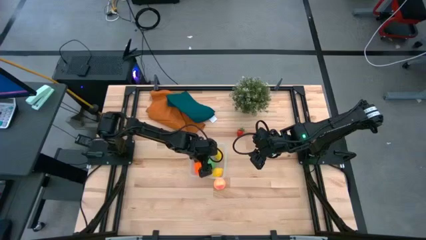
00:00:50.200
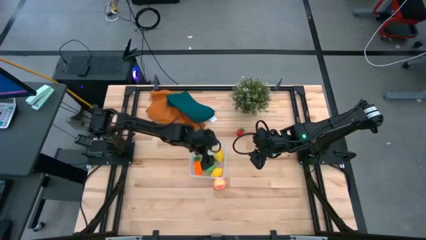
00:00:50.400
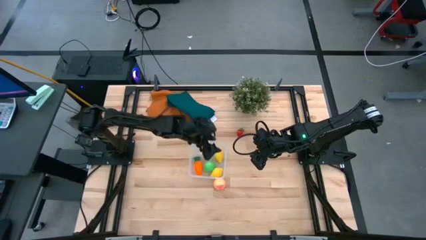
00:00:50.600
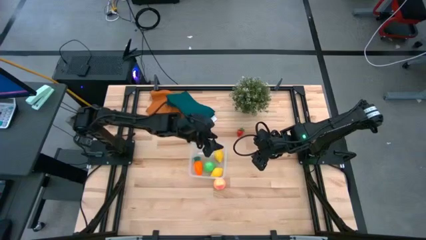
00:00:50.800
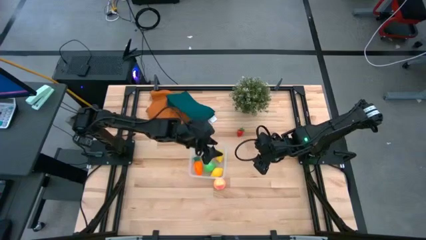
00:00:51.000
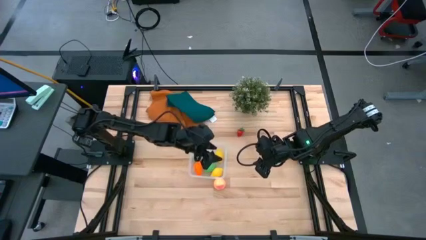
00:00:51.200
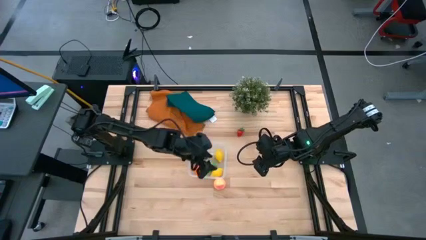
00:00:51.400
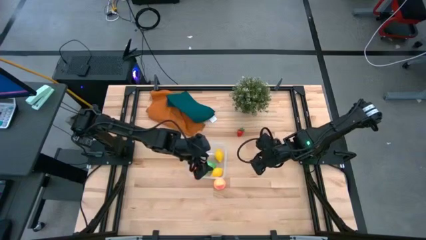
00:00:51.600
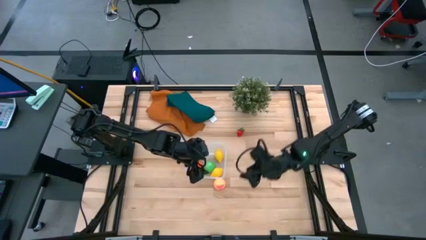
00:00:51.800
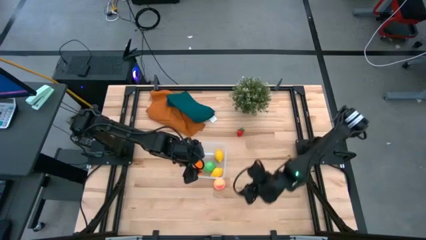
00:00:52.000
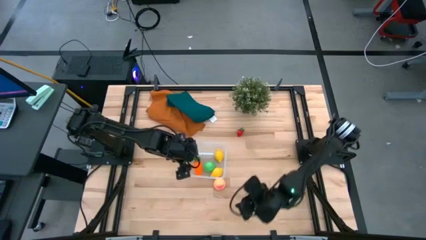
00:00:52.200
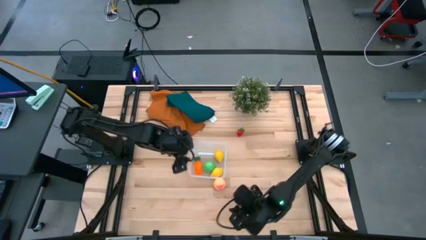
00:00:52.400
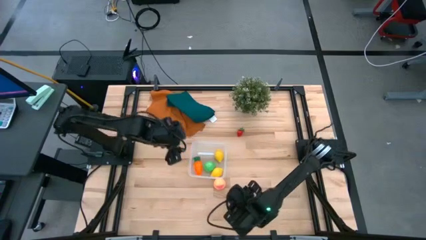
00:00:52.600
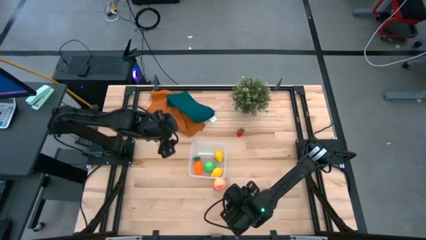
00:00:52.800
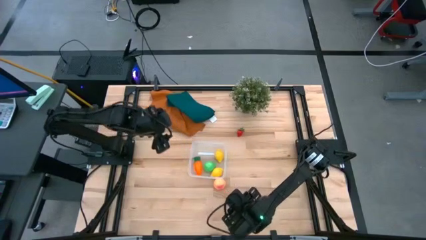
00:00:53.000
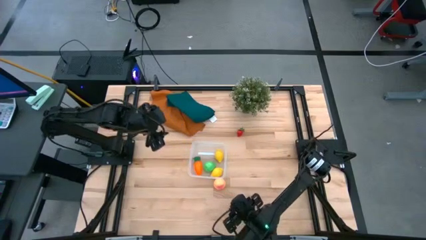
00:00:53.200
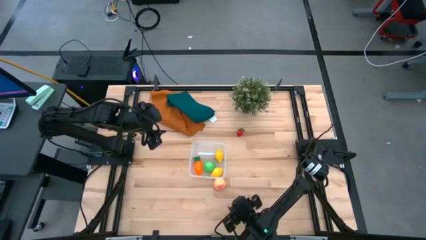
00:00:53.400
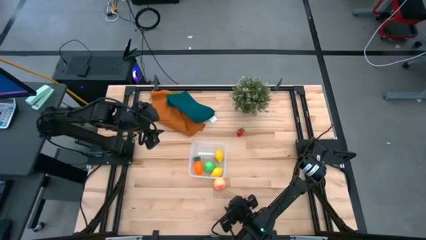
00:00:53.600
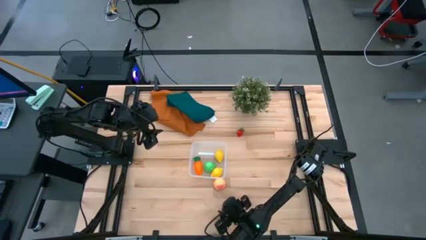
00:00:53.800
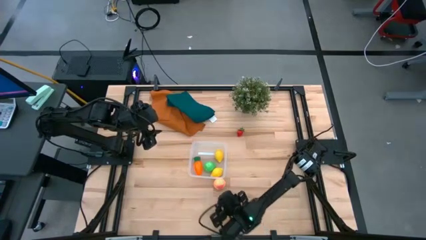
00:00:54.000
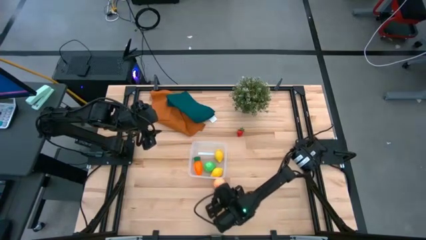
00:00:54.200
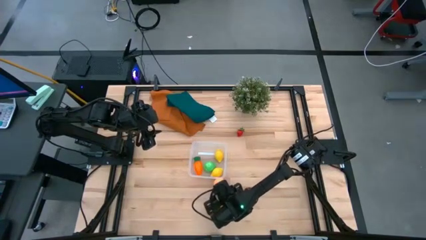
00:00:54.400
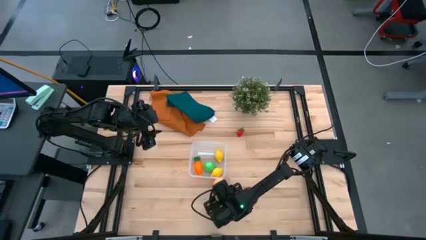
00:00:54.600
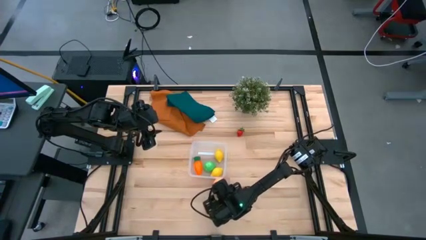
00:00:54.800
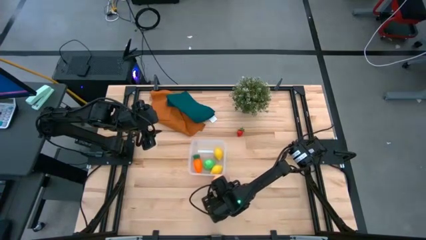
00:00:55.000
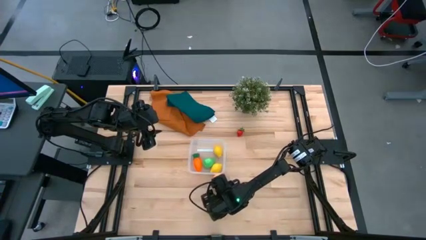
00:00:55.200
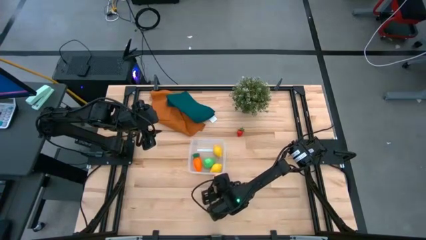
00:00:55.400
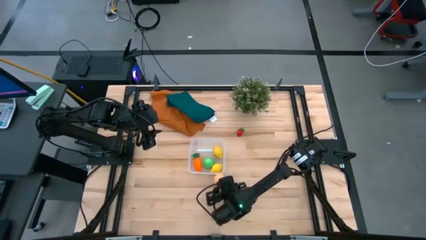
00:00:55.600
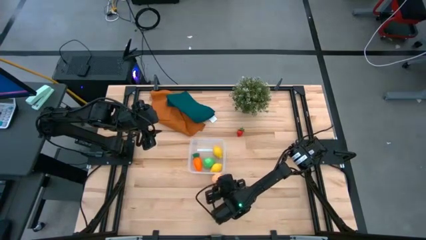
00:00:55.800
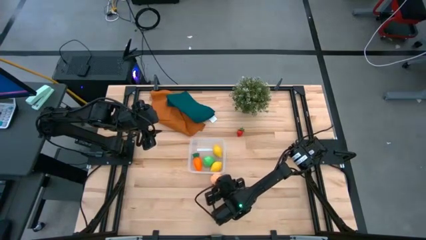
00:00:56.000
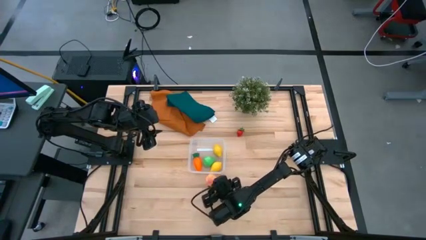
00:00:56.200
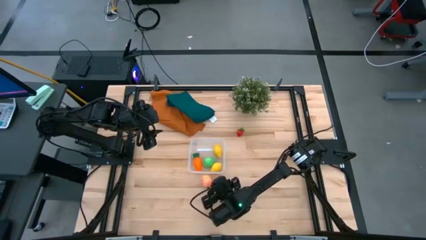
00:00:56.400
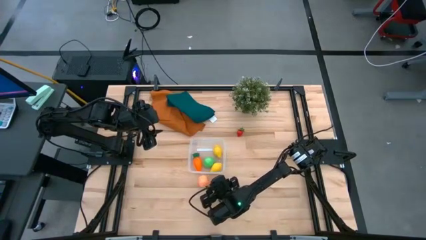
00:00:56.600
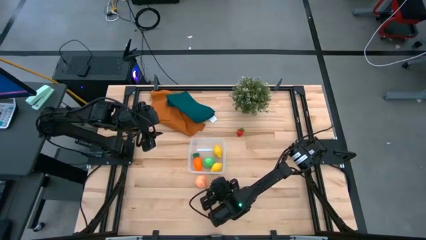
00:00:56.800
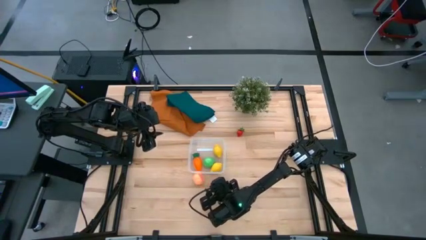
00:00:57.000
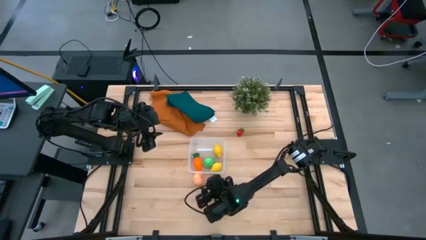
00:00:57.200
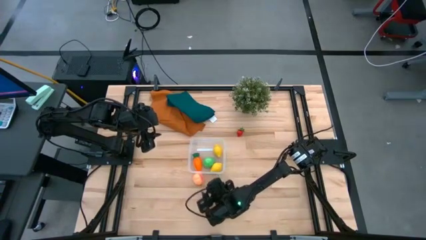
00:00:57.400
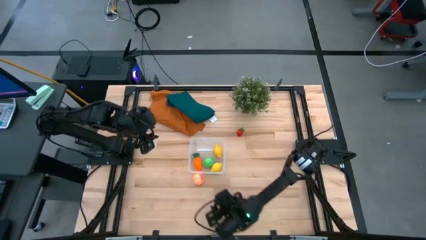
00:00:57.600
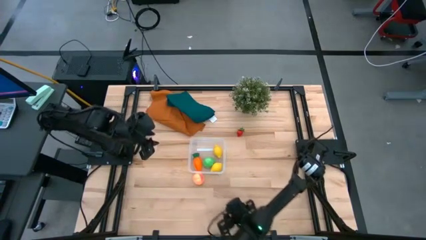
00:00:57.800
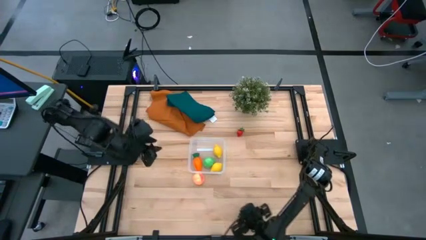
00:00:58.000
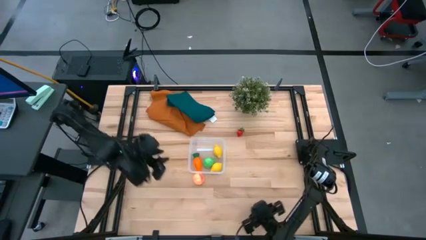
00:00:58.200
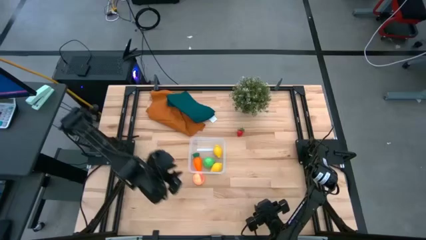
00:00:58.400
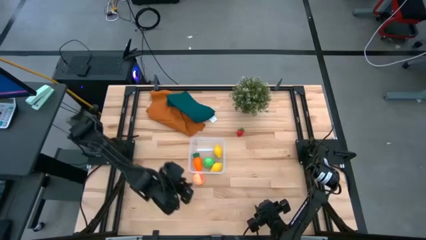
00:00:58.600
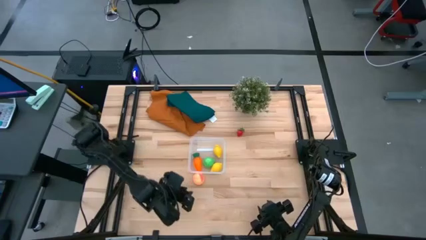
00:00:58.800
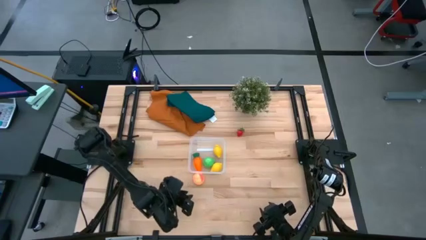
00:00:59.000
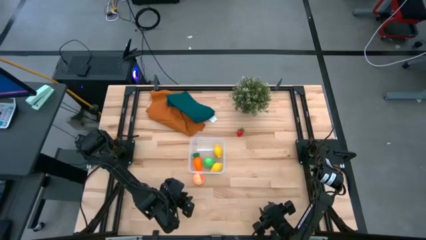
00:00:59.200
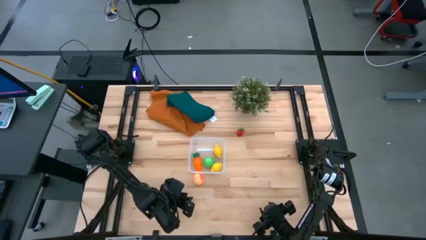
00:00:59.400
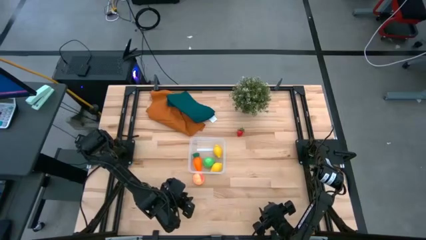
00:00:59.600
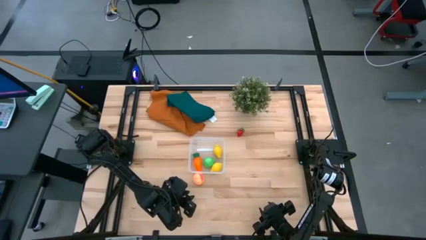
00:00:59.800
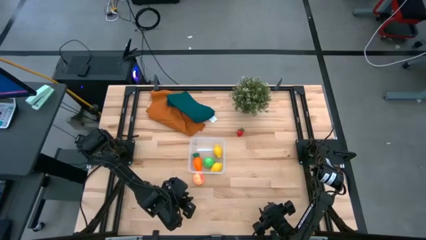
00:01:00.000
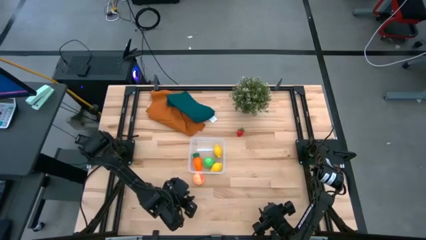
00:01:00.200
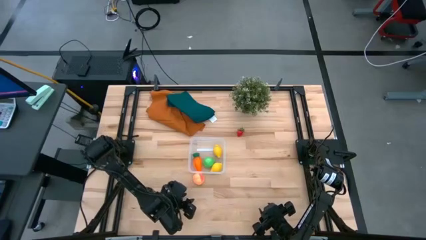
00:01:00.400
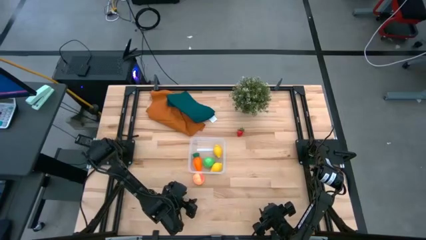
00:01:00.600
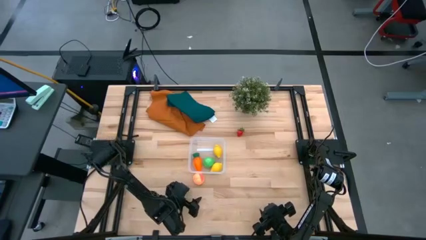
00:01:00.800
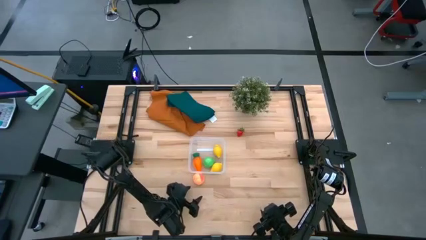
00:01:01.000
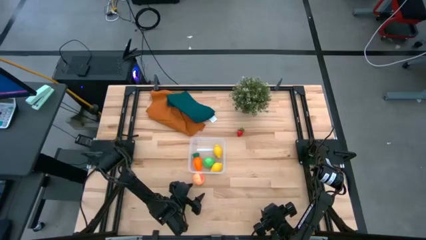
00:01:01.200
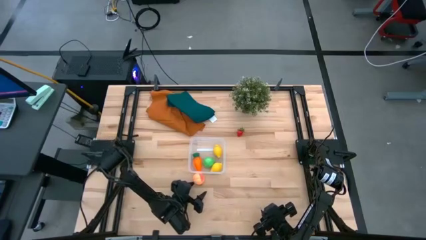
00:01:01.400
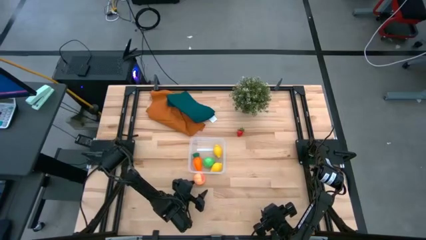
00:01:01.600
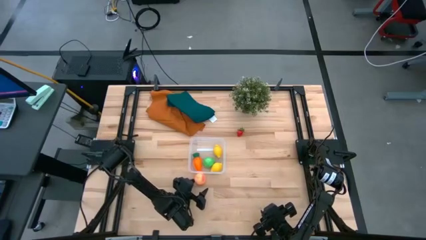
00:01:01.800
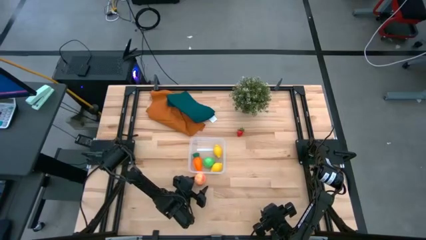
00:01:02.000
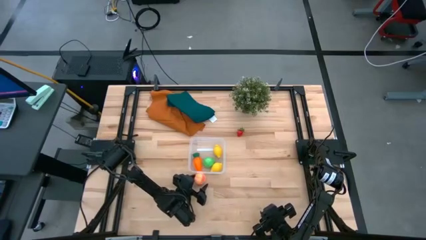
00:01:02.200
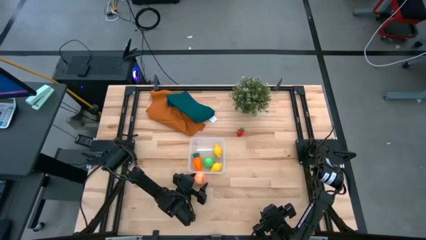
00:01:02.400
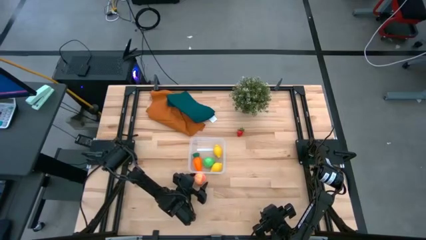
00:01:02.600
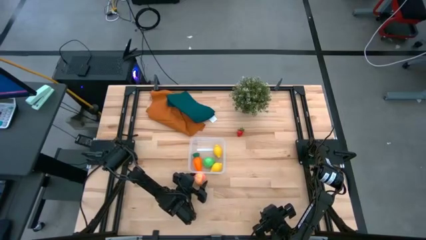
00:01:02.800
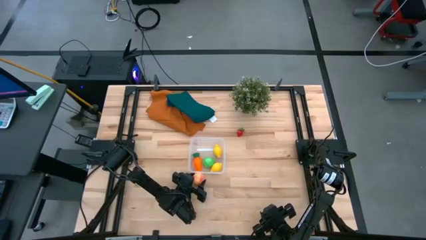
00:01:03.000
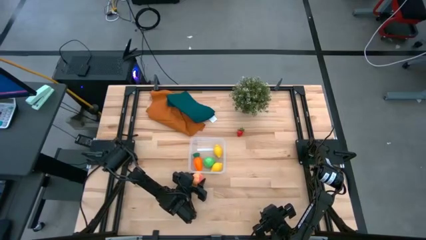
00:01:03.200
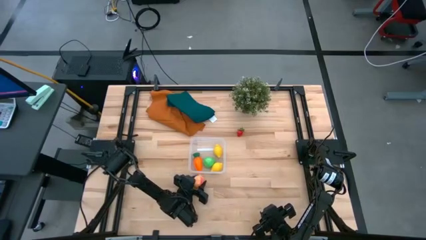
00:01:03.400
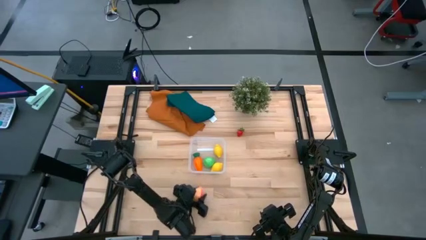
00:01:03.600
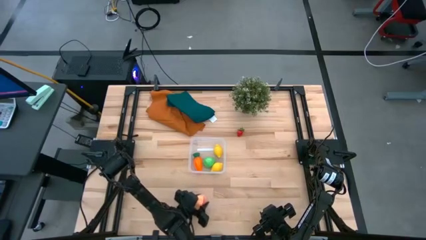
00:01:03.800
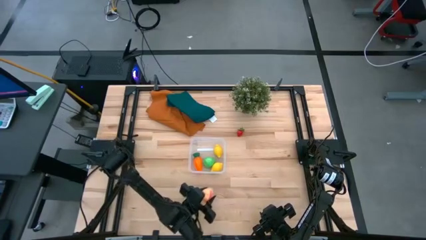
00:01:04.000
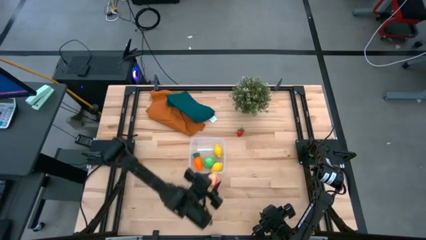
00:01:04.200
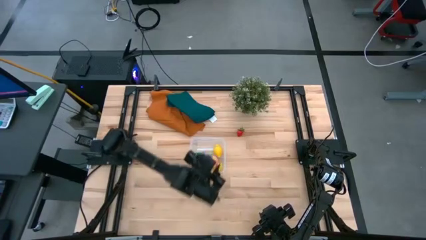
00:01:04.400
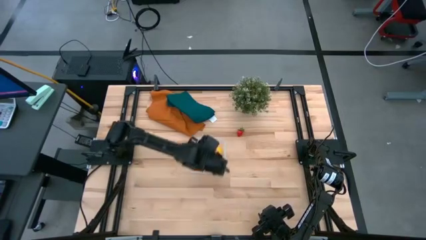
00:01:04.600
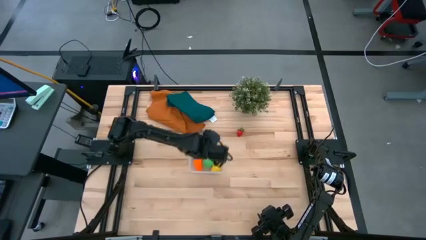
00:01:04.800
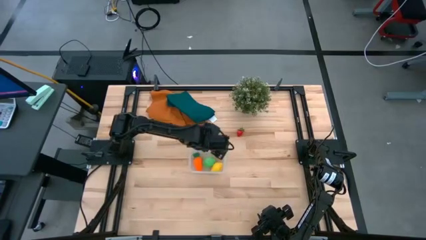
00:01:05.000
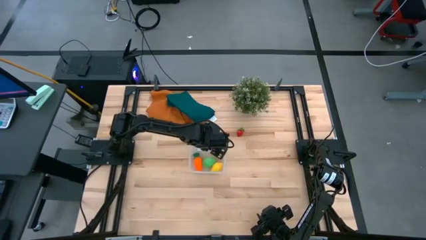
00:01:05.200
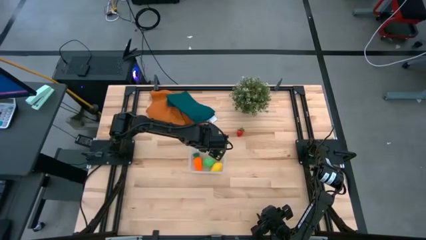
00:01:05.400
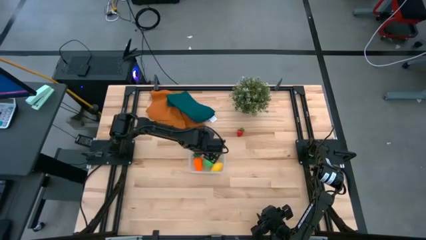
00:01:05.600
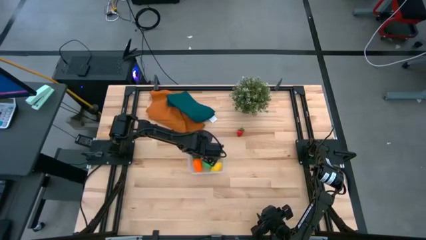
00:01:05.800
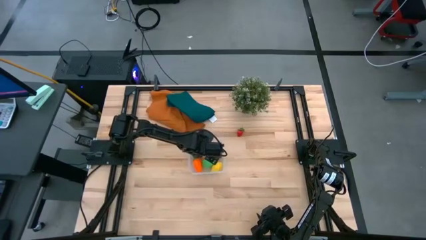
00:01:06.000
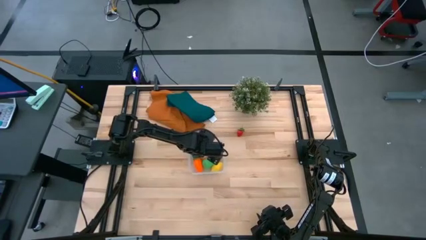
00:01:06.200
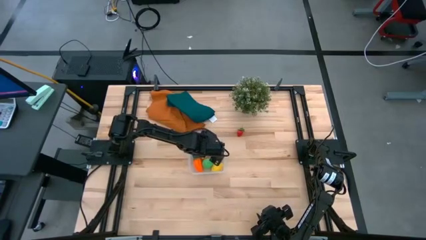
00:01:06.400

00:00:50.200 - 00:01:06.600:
Task: Pick and placing Produce into tupperware
Put the orange peach into the transparent container
